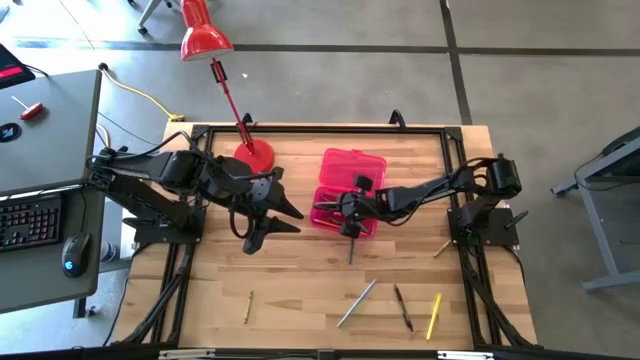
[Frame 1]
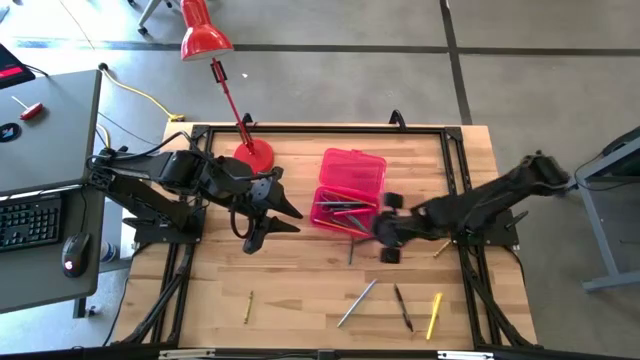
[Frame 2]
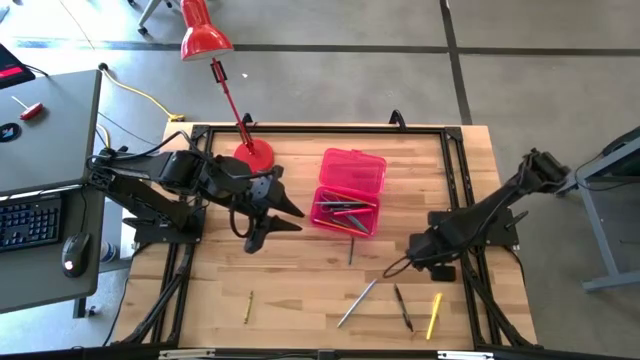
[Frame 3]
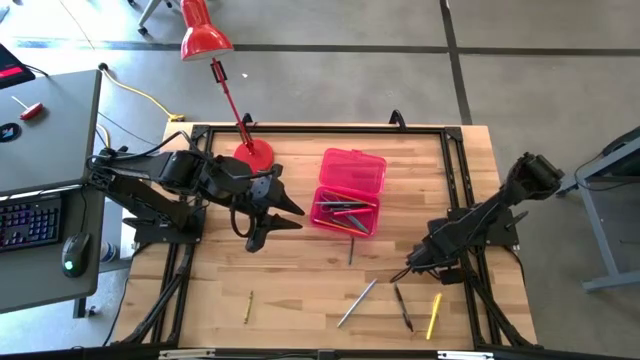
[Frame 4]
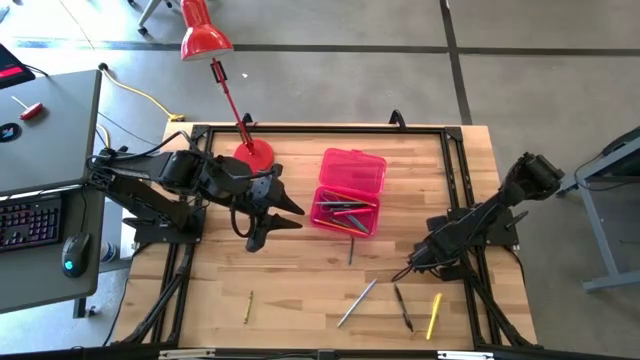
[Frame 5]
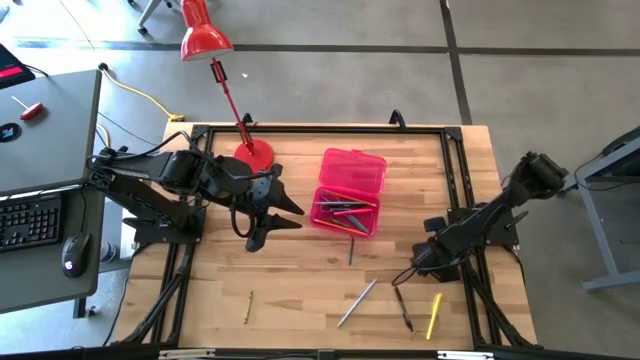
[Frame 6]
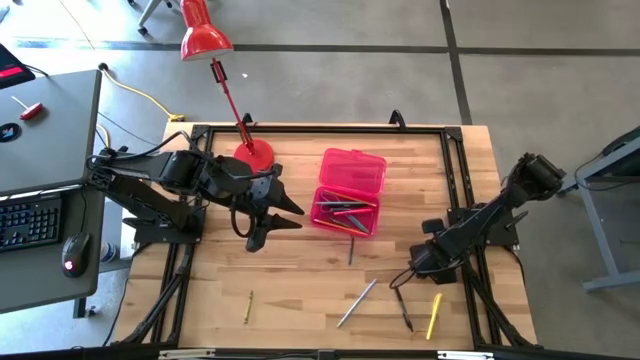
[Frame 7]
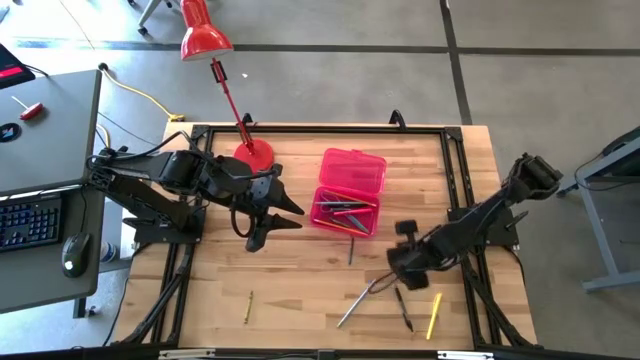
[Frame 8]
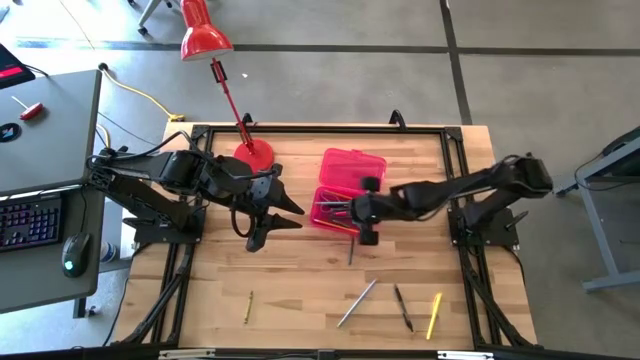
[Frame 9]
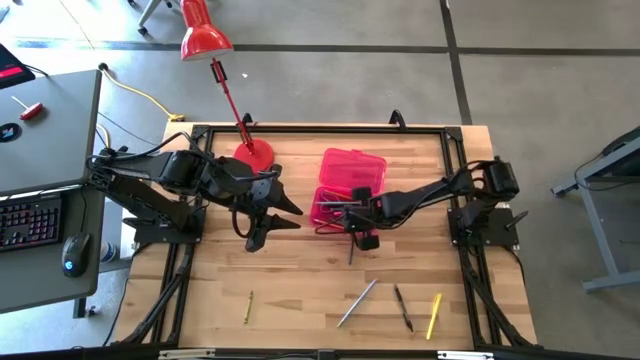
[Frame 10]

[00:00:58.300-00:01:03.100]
Task: Pick & place school supplies into a supply box
Put the right green crayon into the red supply box

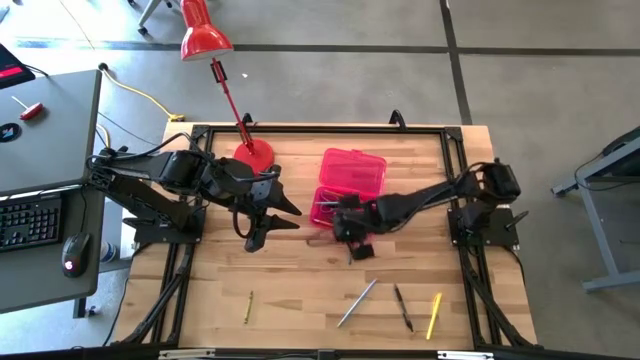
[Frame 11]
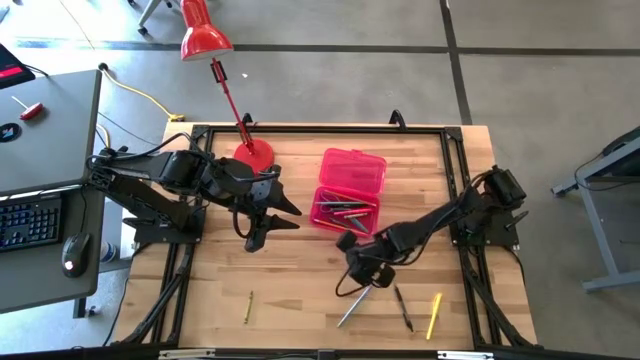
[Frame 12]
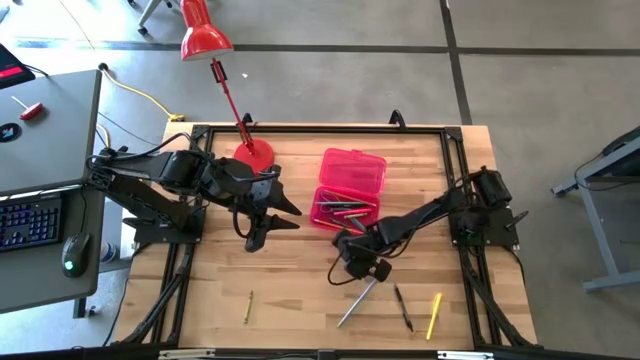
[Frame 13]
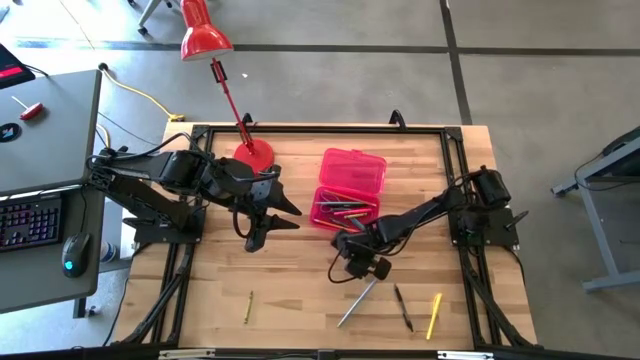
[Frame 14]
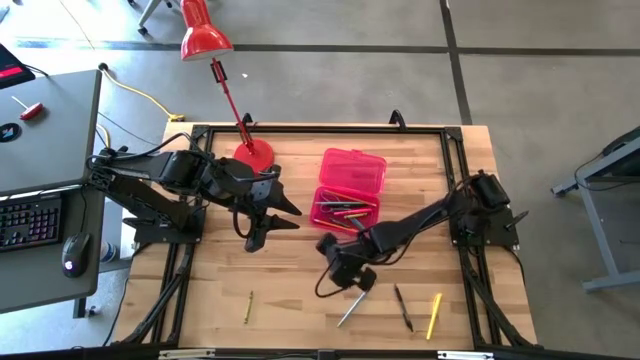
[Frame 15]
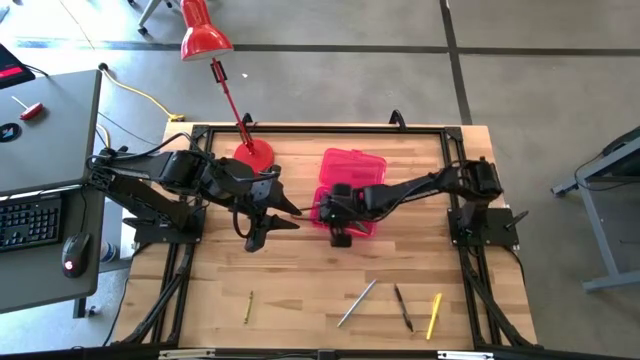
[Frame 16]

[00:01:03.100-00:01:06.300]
Put the dark green crayon into the red supply box

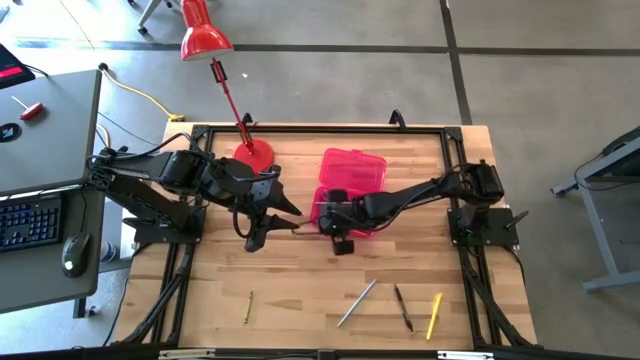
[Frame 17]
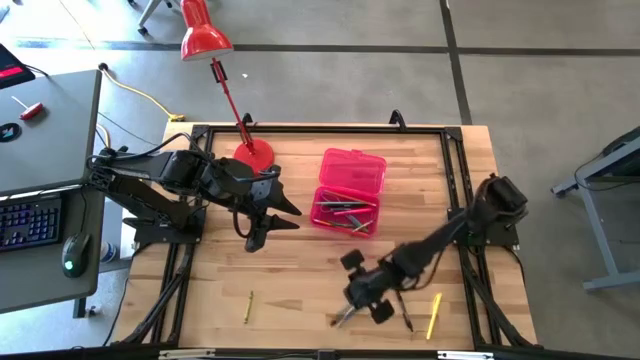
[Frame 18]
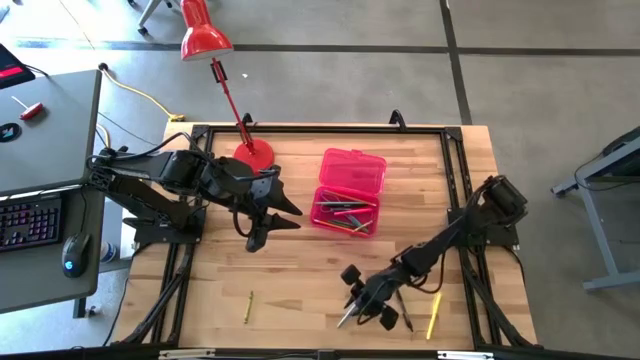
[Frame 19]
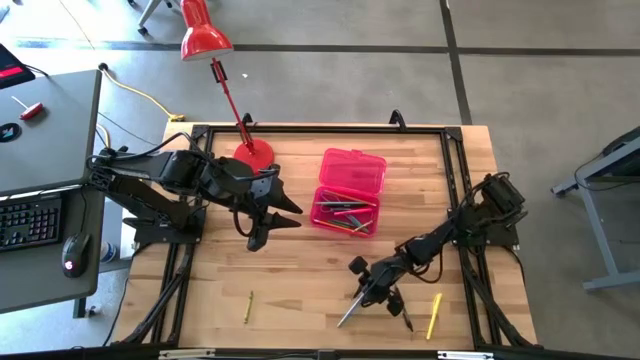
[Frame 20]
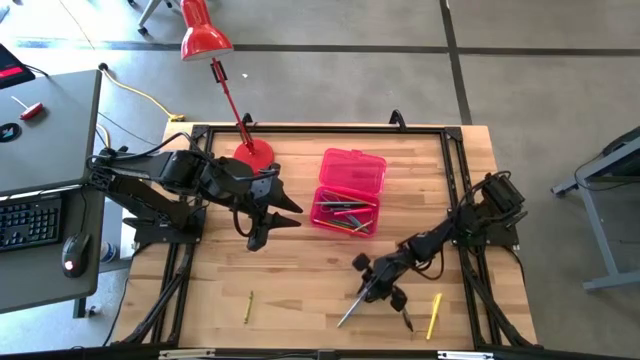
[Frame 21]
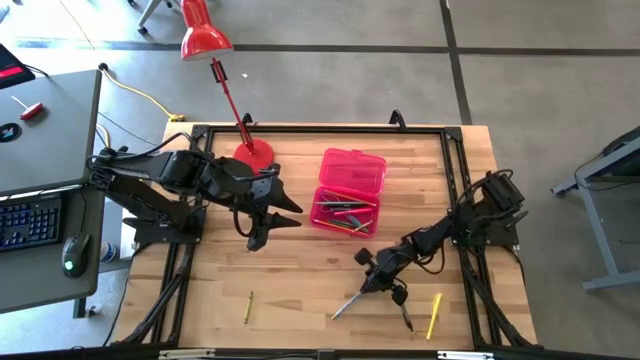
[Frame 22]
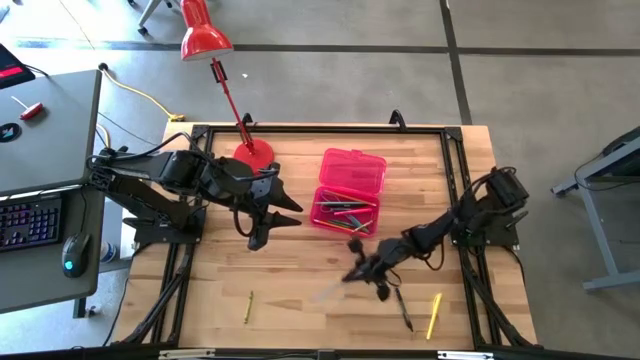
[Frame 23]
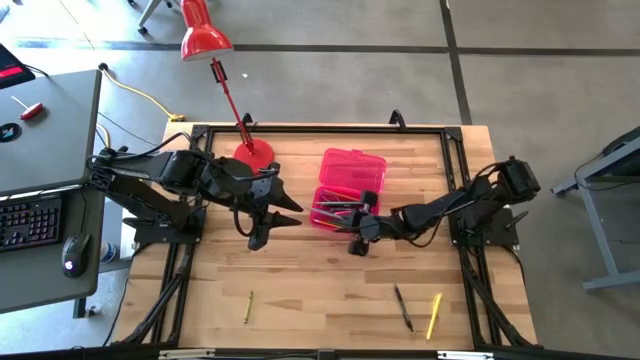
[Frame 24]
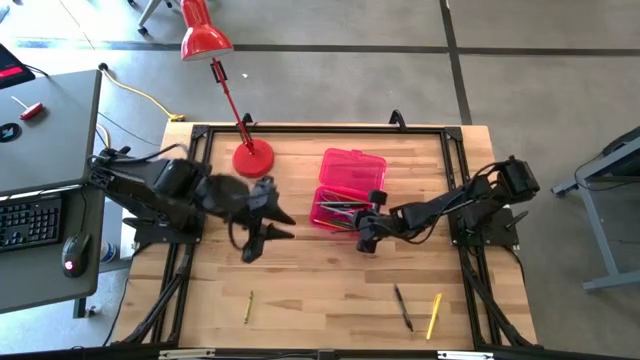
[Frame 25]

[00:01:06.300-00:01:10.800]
Put the light blue pencil into the red supply box

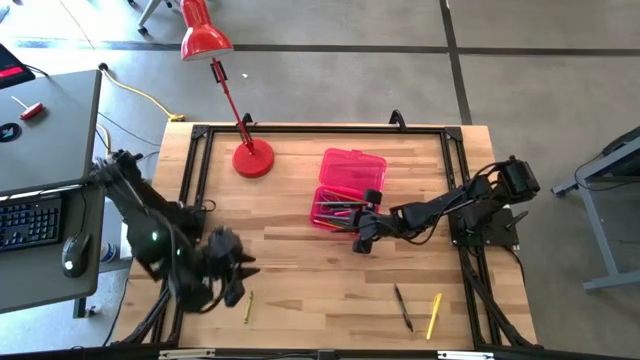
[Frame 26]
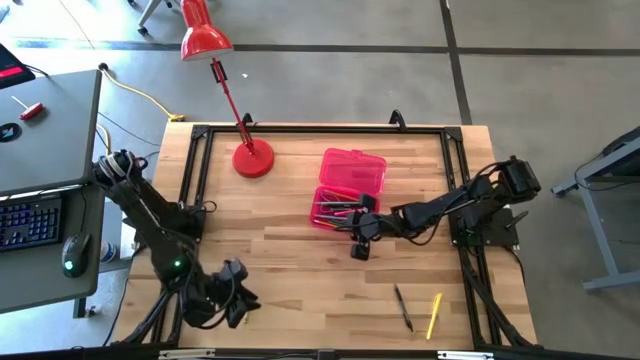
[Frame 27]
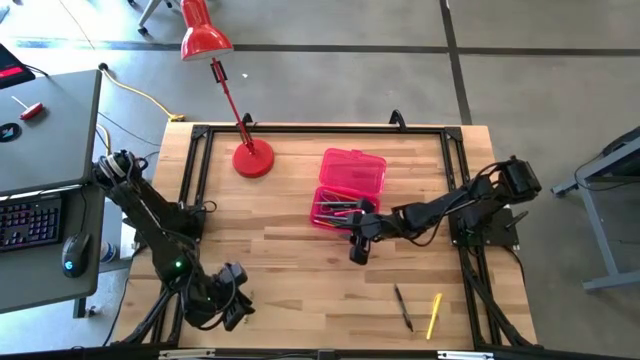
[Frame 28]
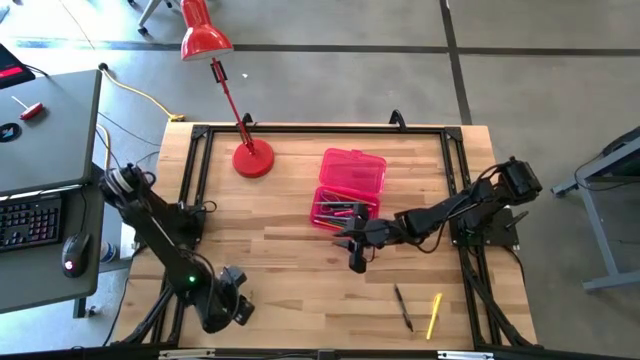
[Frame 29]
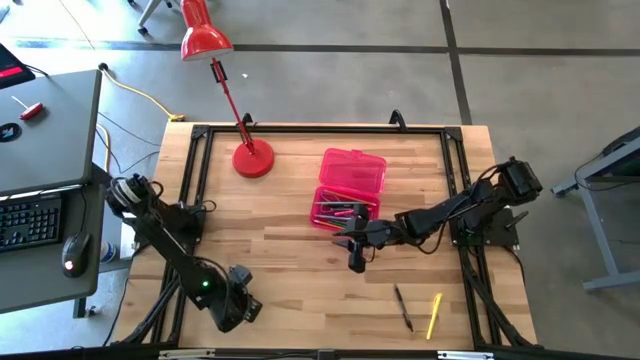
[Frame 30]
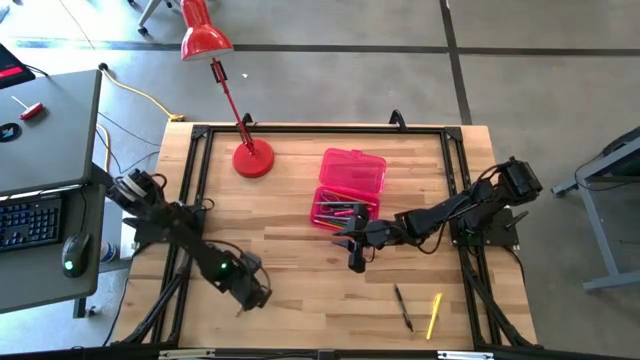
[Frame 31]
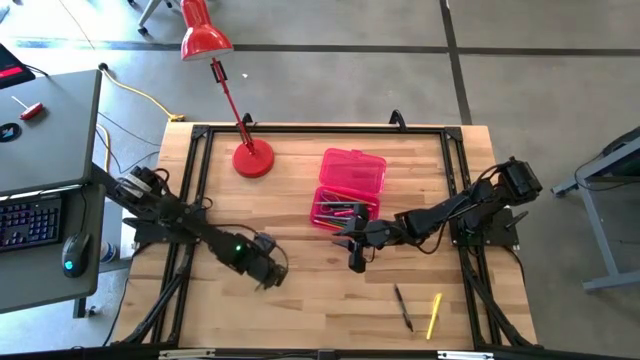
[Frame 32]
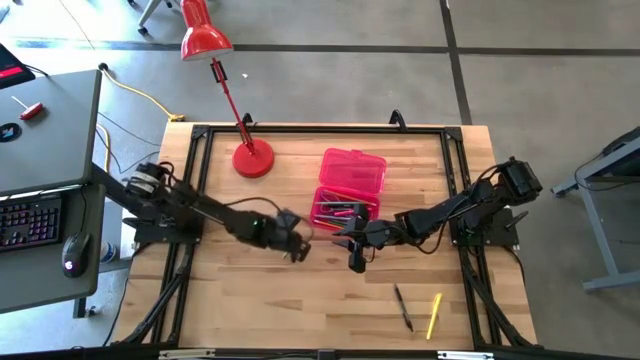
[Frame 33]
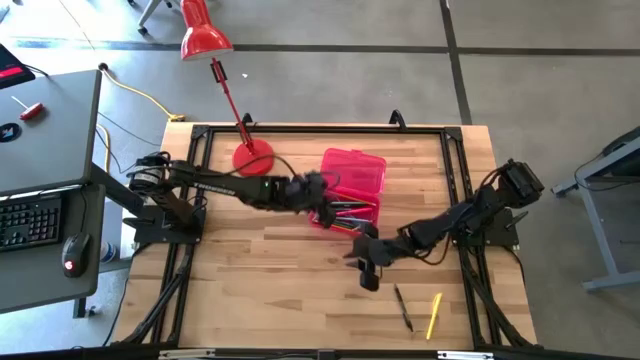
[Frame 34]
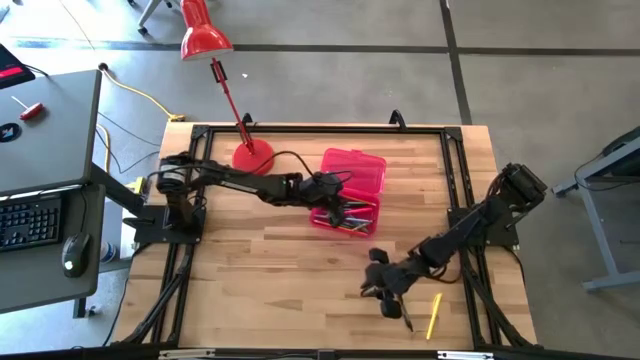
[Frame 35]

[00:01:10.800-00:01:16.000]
Put the green crayon into the red supply box

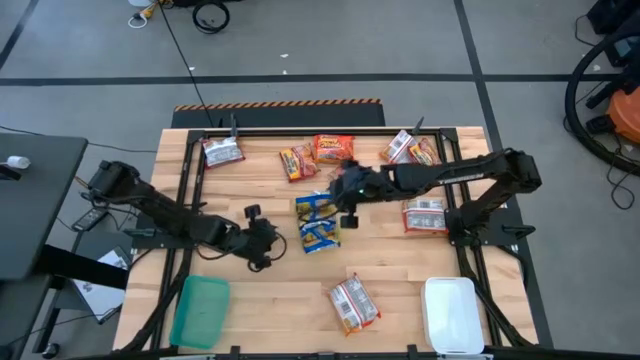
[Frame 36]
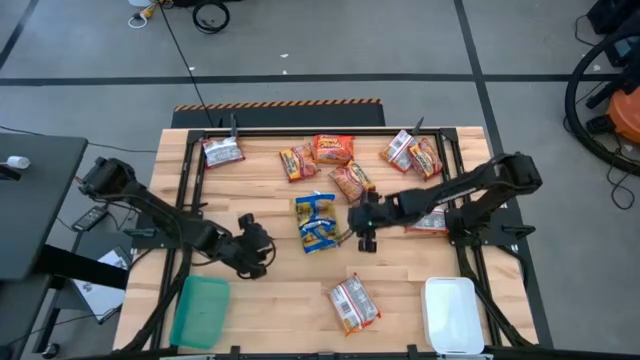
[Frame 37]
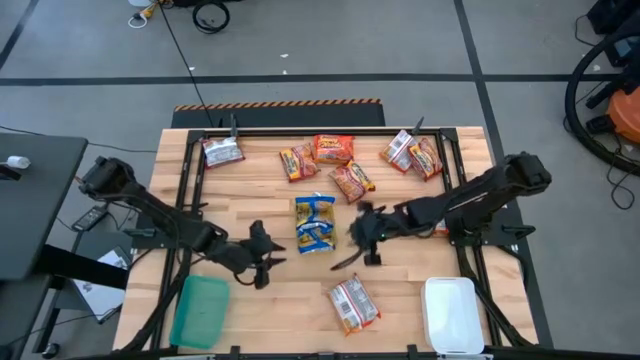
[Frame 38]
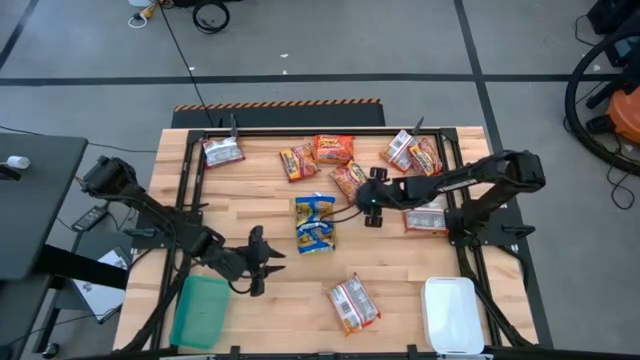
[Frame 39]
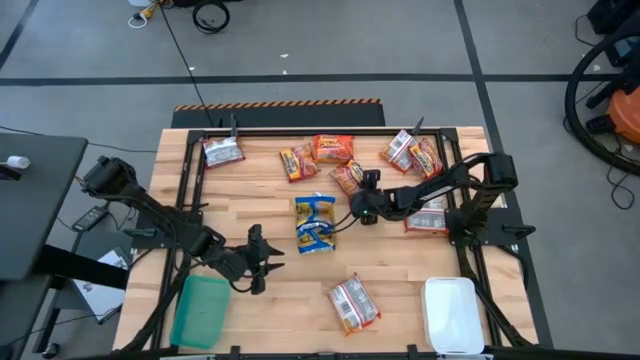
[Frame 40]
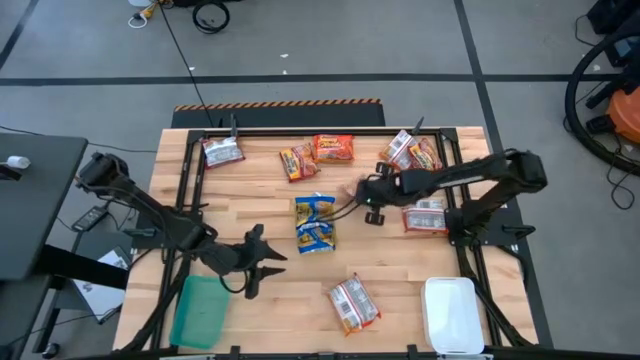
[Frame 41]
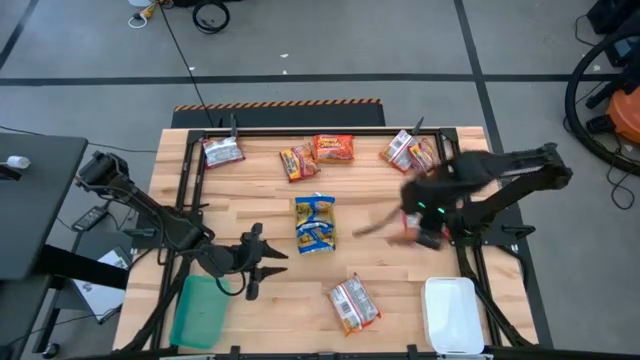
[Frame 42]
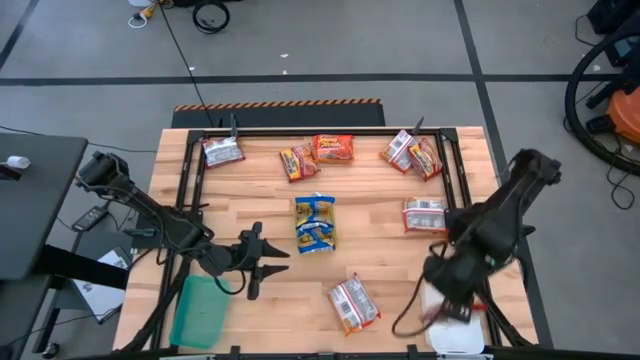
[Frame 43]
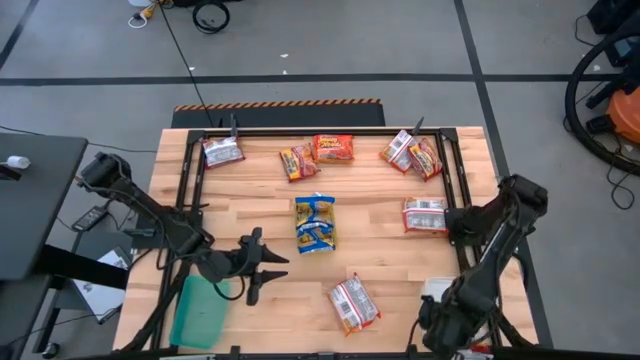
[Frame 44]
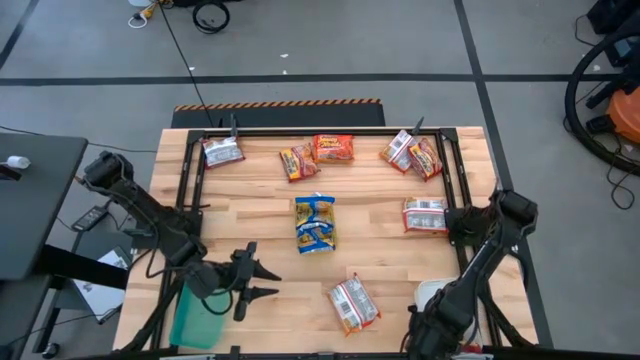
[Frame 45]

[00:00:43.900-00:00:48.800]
Task: Sort Maruchan noodles
Put the red noodle pack into the white bin
